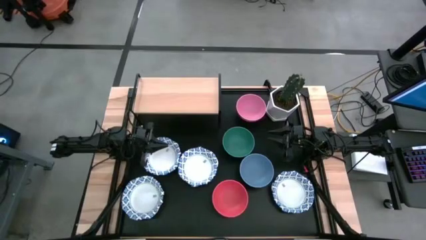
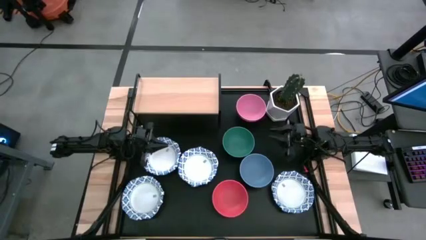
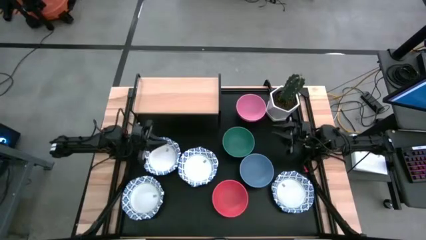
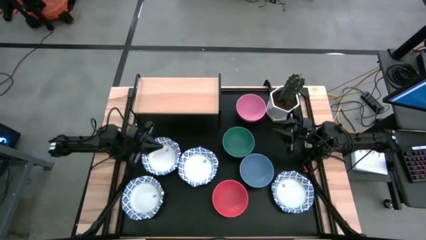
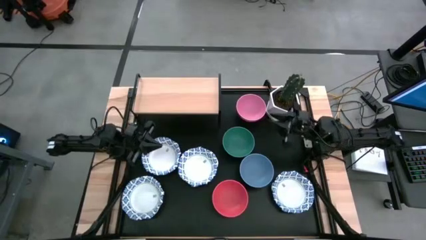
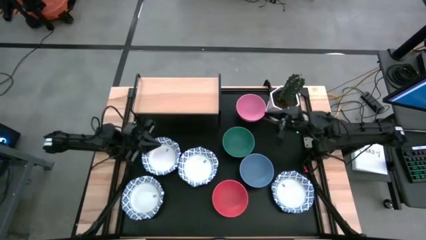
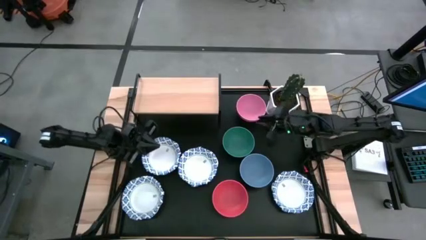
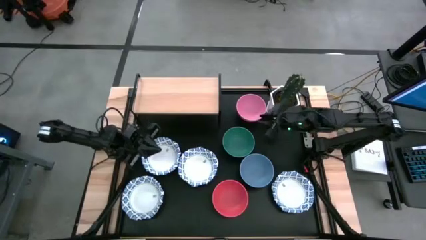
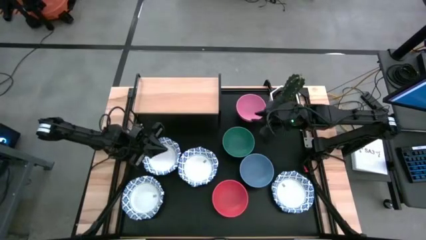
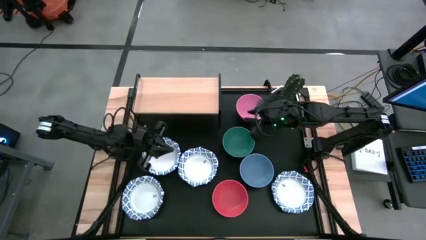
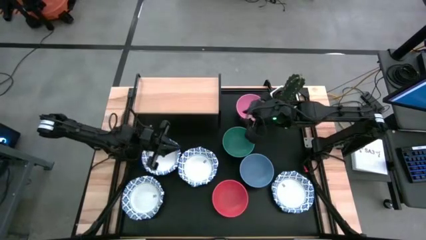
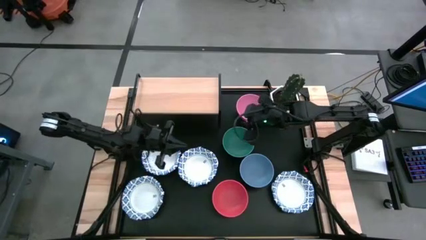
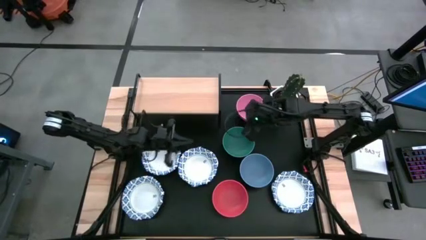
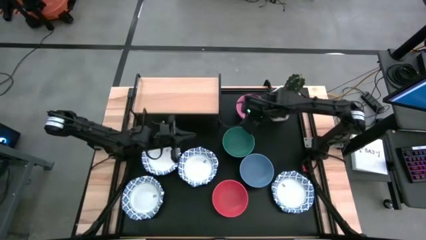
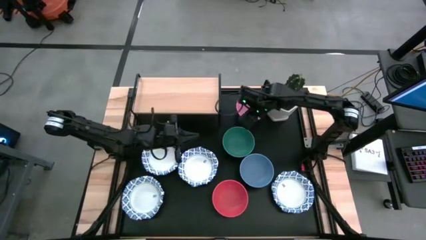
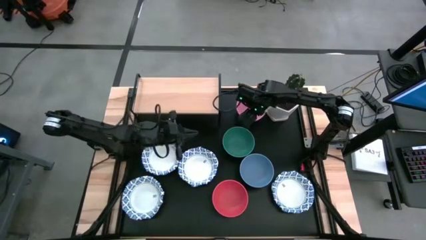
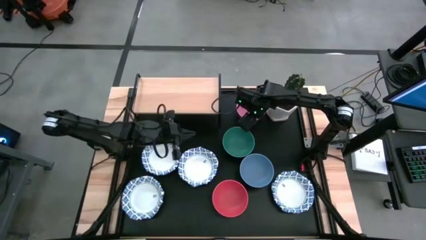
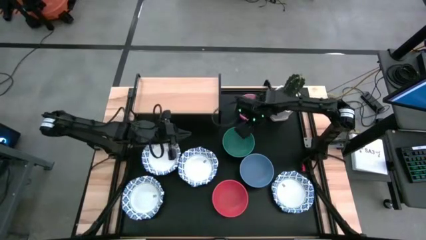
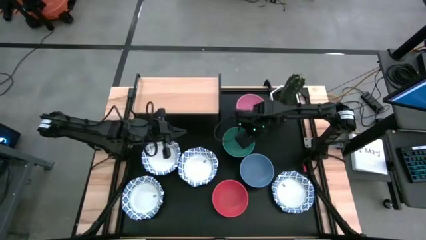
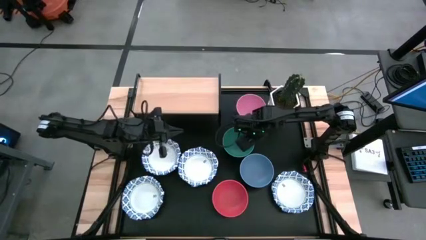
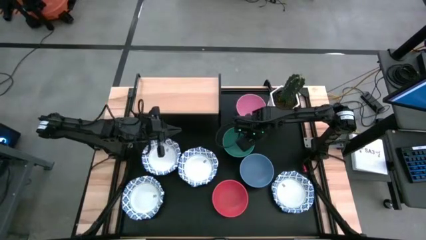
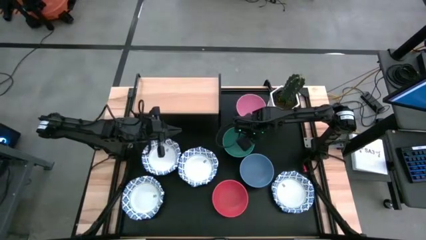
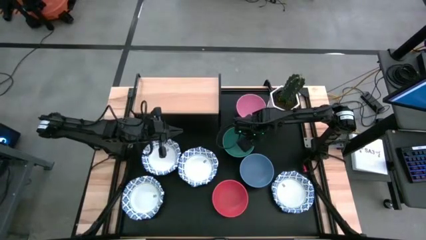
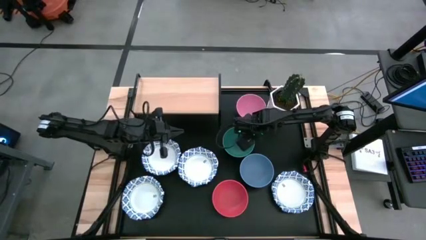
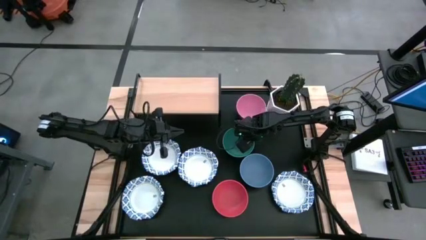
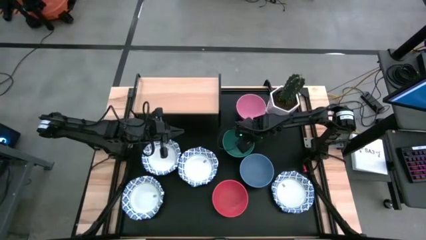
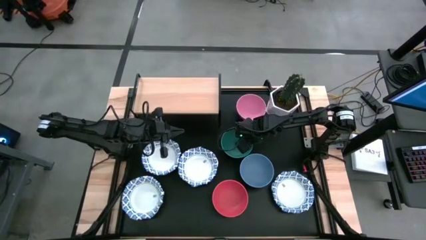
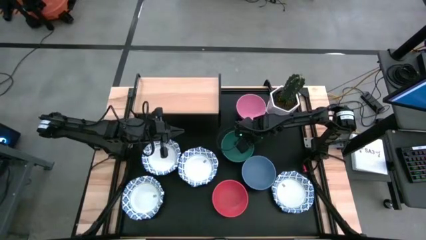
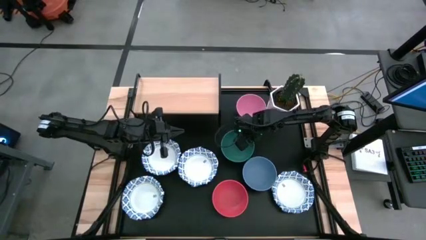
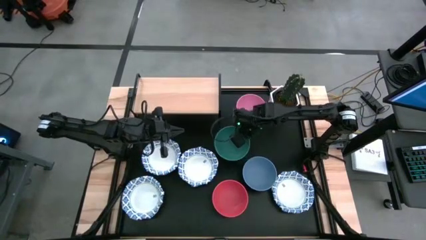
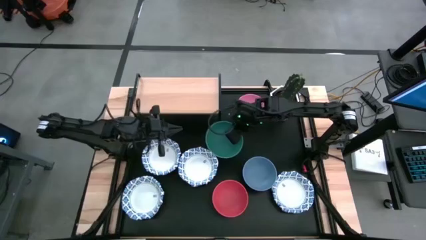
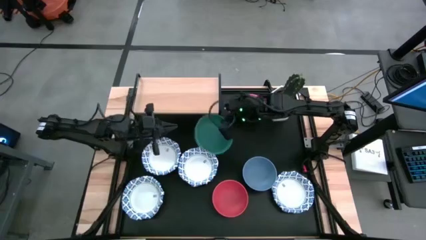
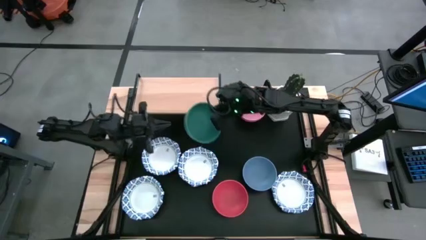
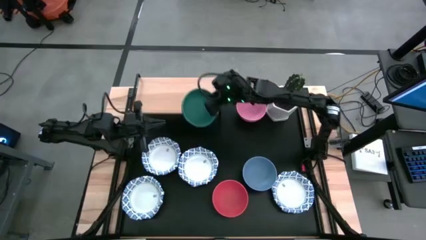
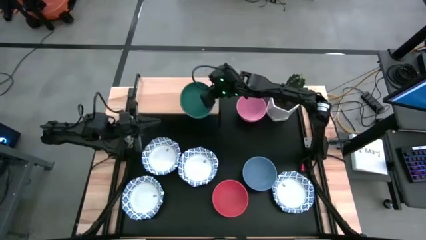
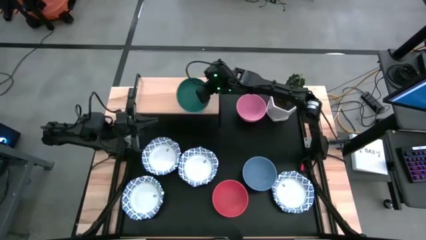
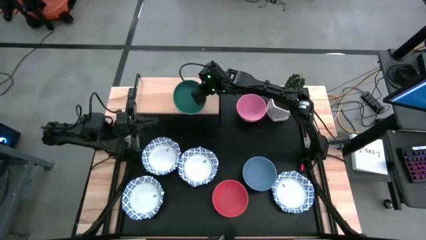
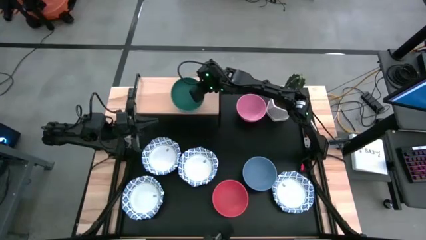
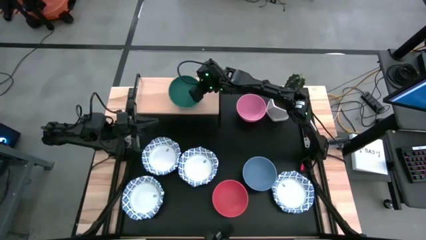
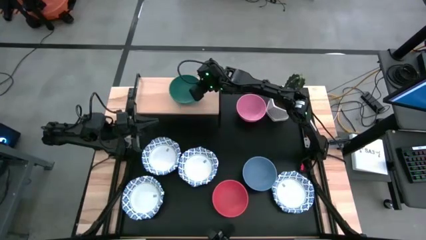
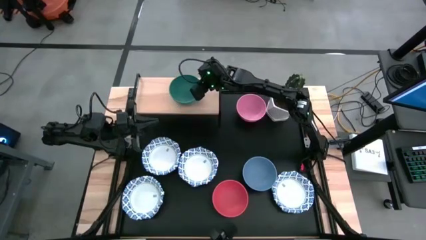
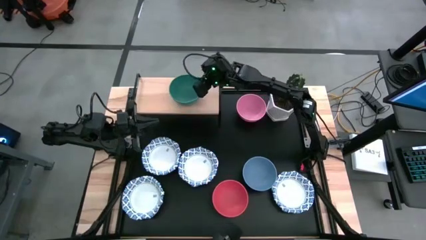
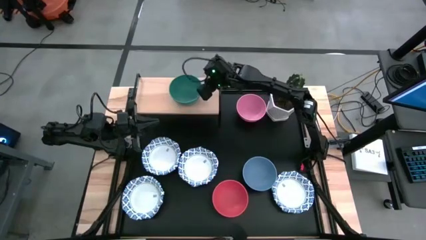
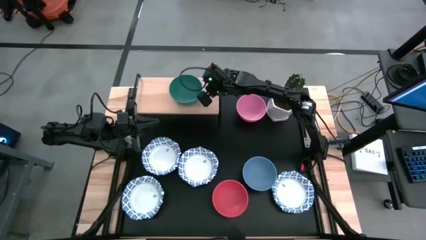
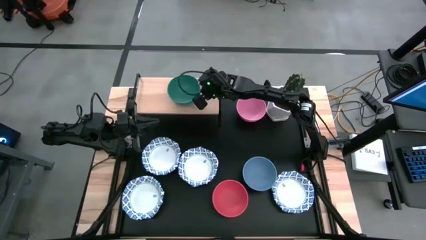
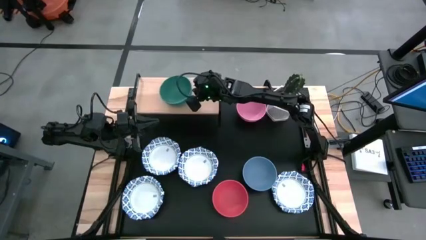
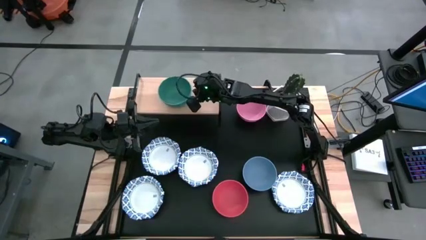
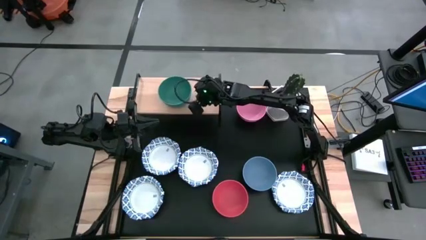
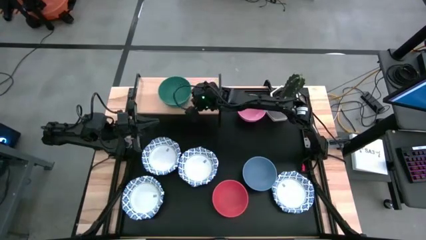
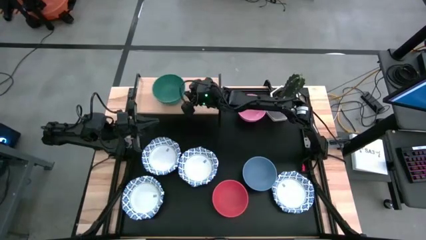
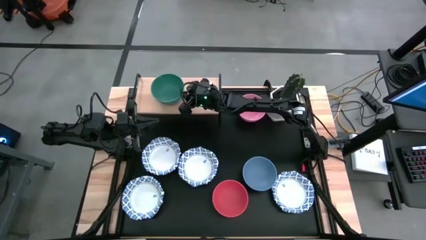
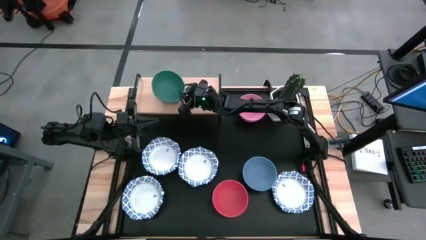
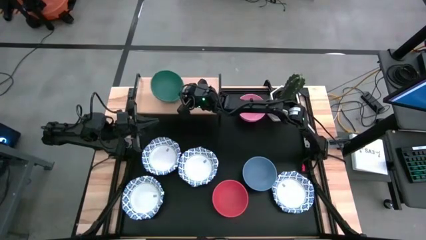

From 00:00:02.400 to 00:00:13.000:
Task: Place and stack bowls onto a shelf
Put the green bowl on the shelf

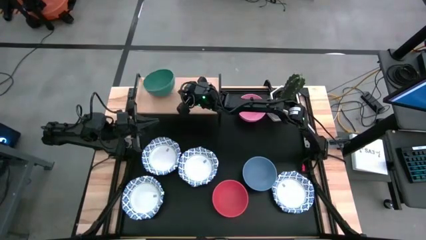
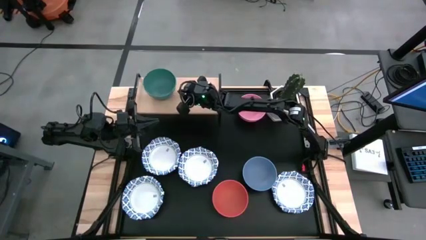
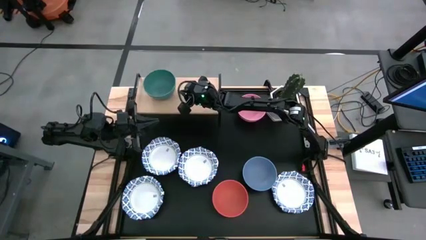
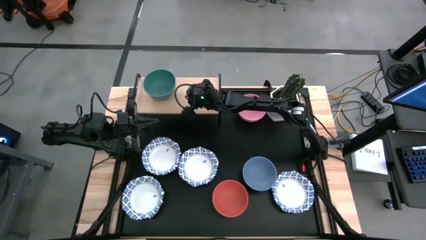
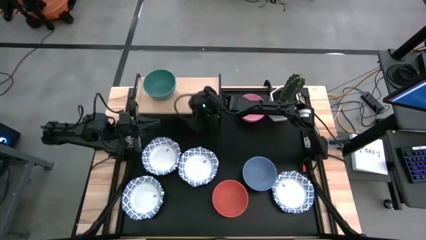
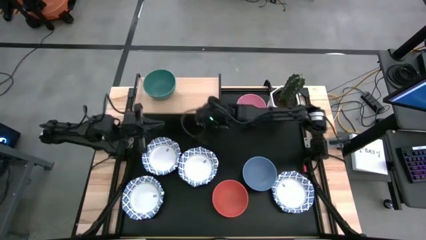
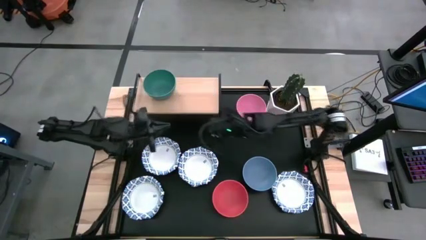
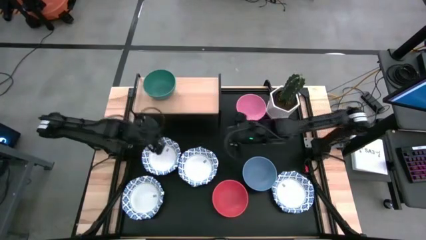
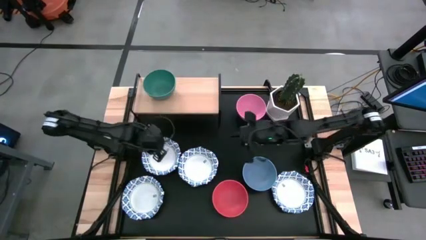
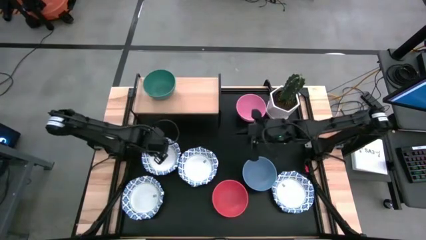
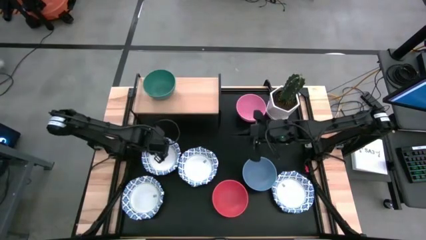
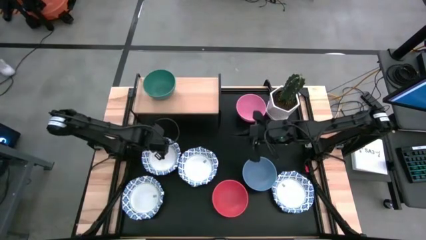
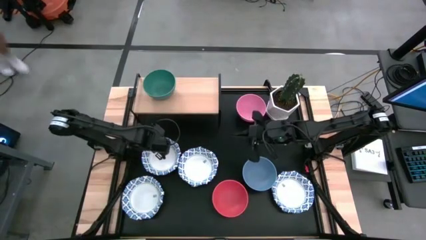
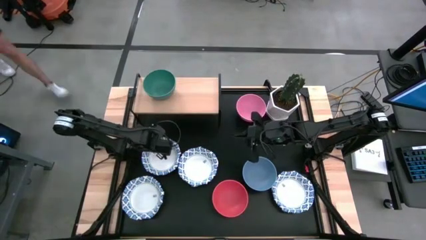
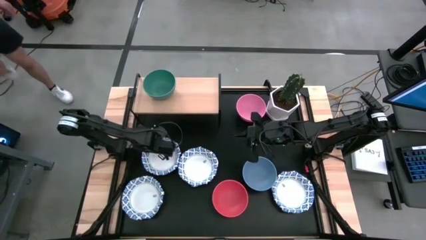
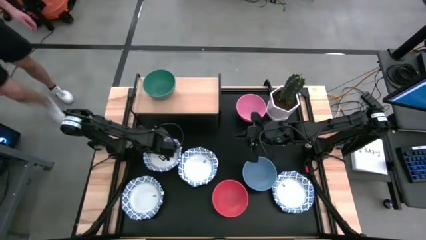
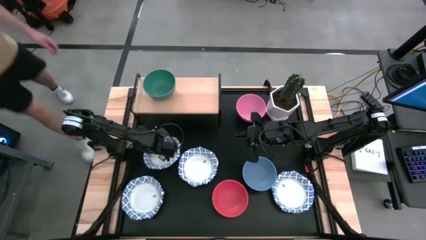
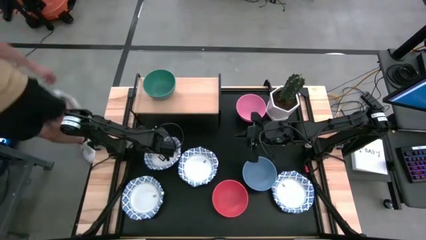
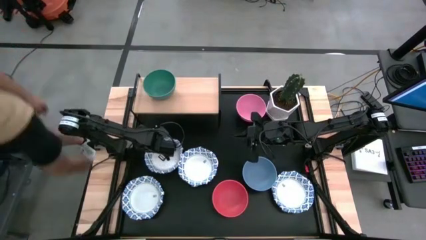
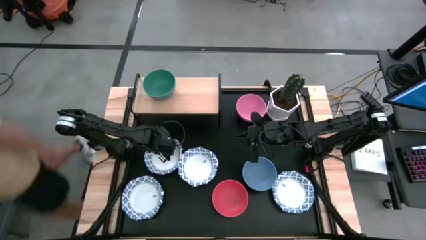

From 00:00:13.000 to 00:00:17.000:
Put the white patterned plate on the shelf

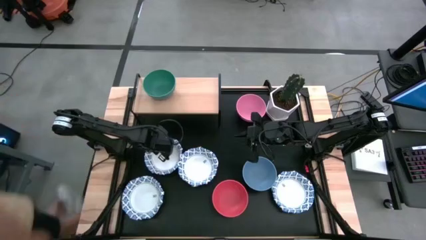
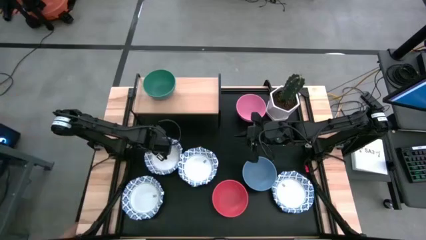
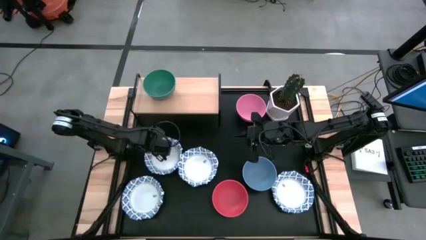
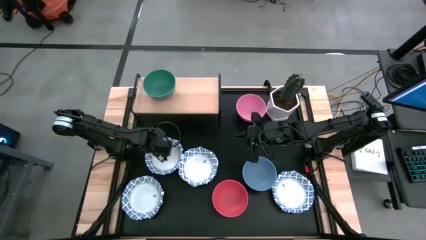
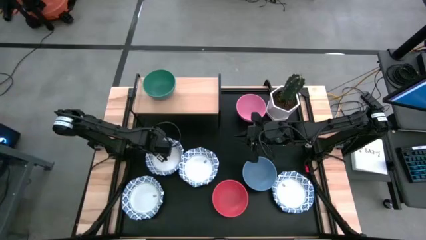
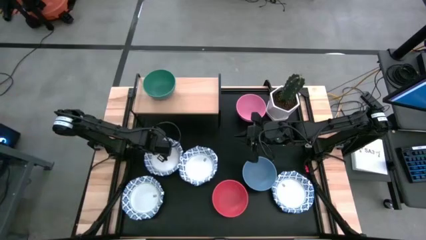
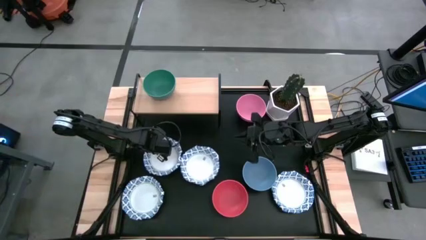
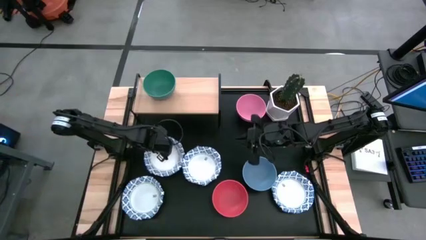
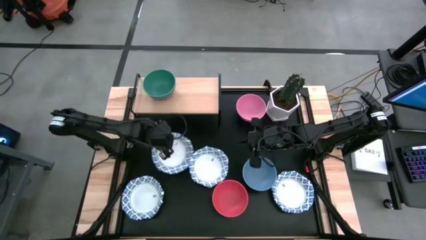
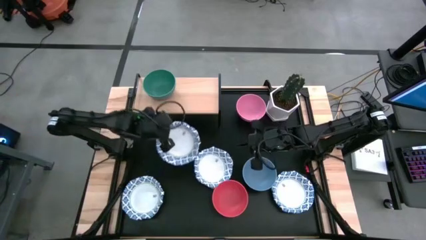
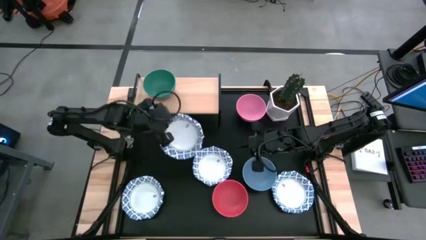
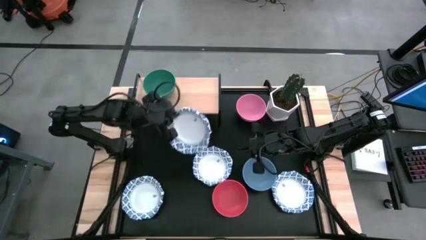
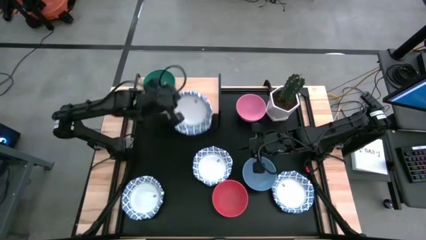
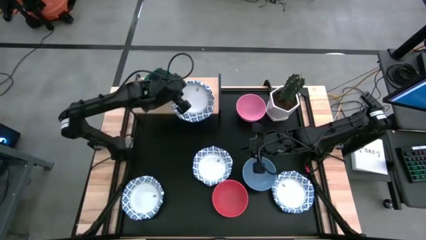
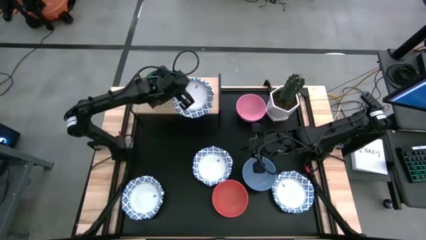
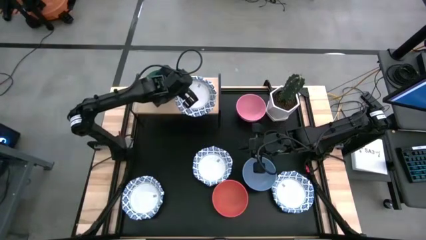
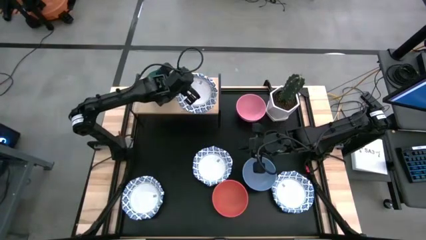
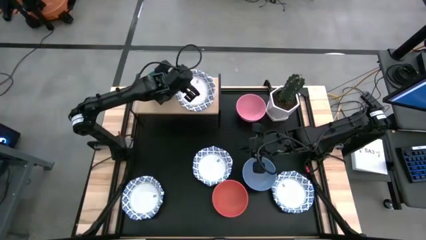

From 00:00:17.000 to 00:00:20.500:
Put the white patterned plate on the shelf
